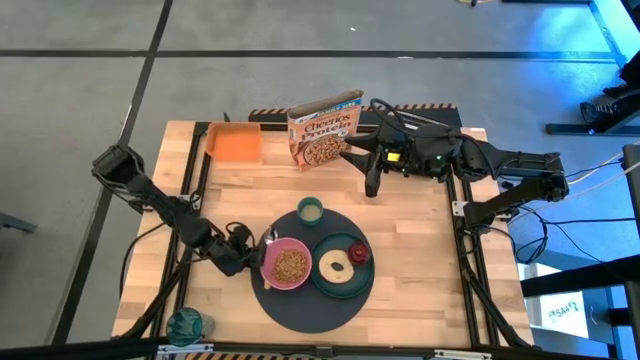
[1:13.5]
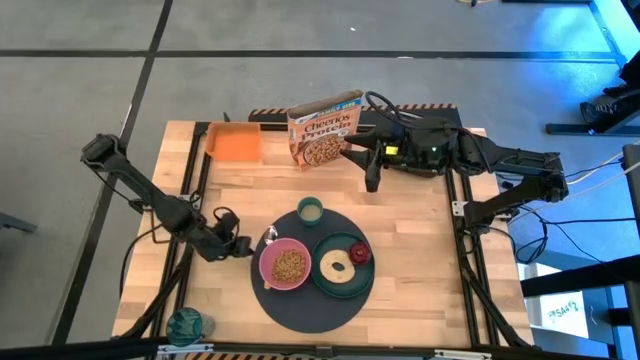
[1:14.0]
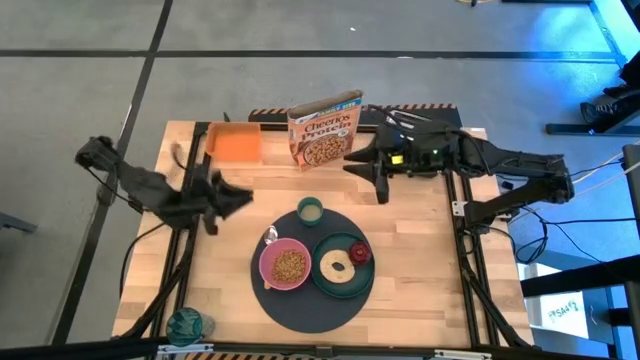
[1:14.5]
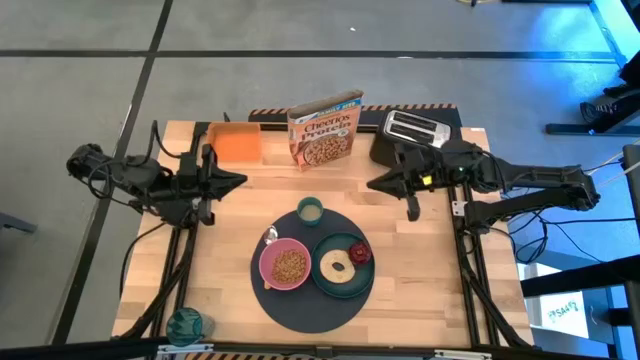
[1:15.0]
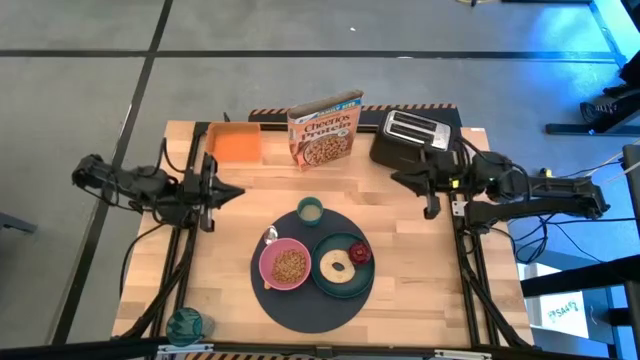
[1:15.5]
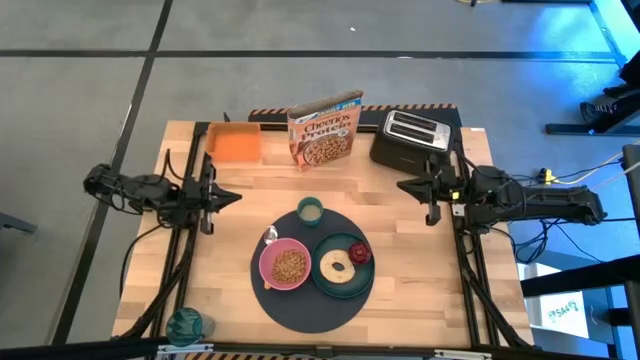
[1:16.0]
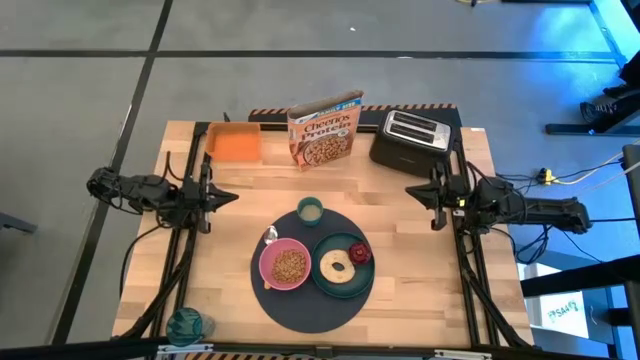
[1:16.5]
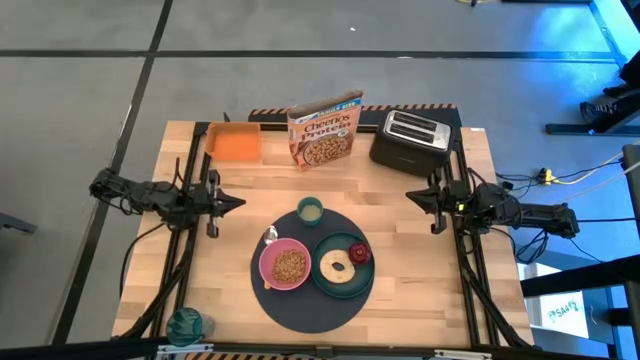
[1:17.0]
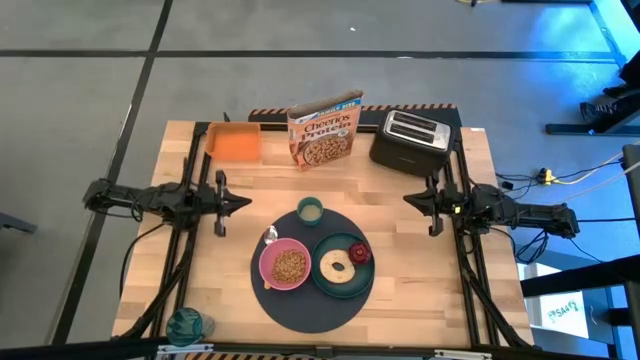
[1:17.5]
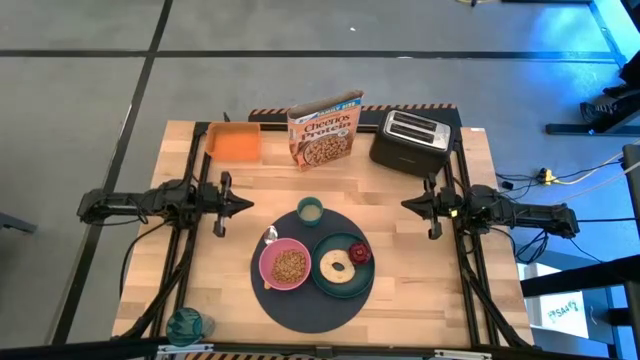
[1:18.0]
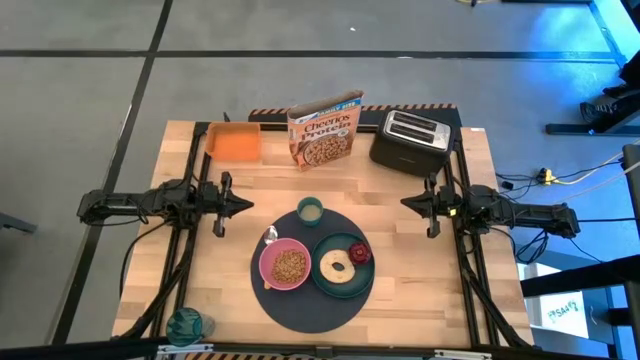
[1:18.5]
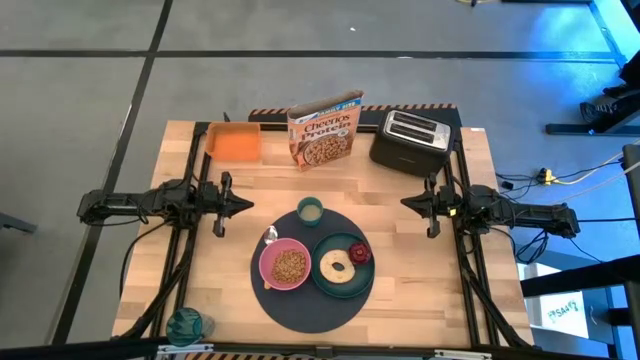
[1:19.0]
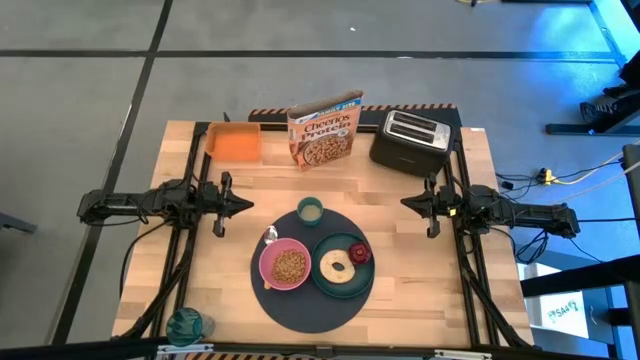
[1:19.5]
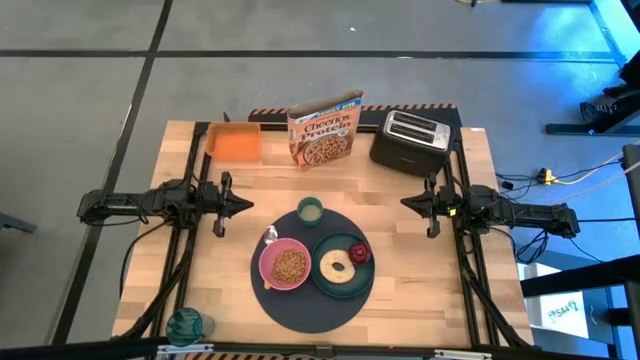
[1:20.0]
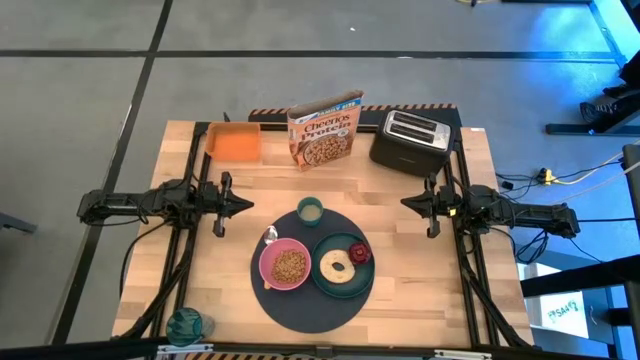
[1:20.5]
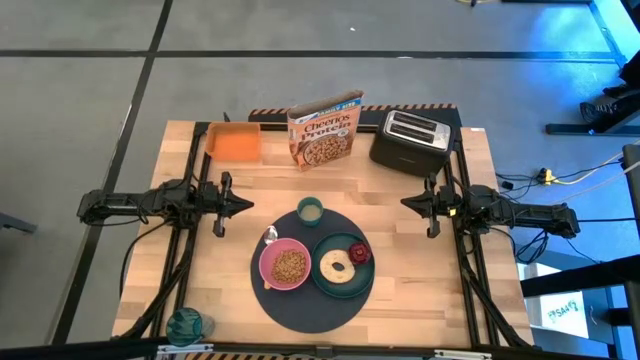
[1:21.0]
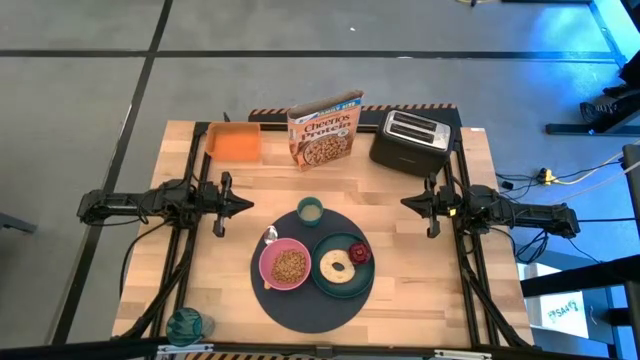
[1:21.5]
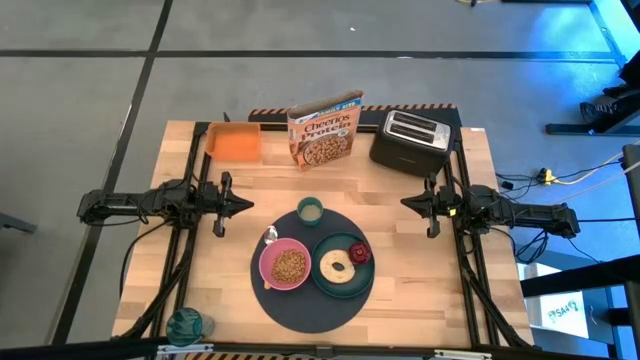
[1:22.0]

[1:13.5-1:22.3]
Task: Arrange a breakfast setting
Return to Home Position

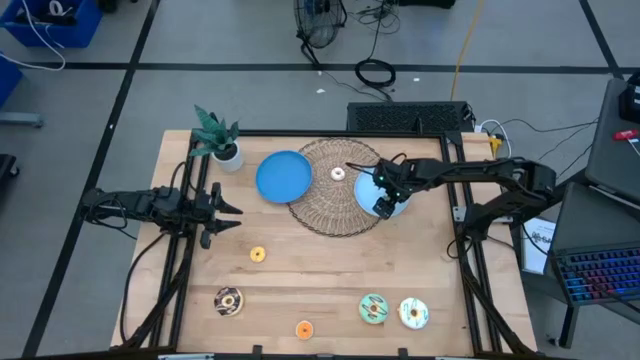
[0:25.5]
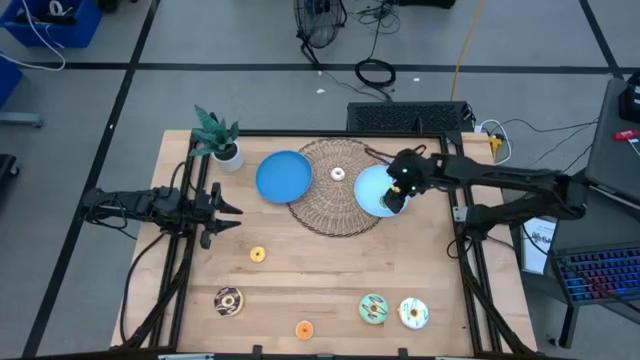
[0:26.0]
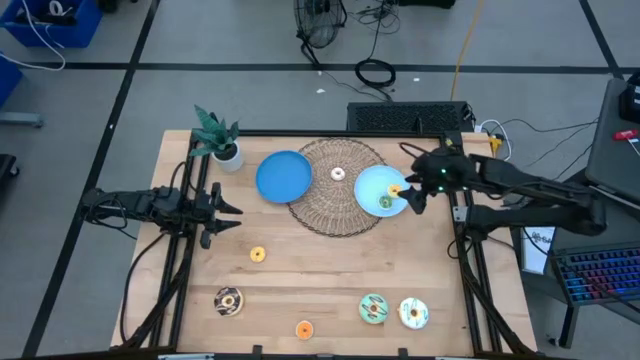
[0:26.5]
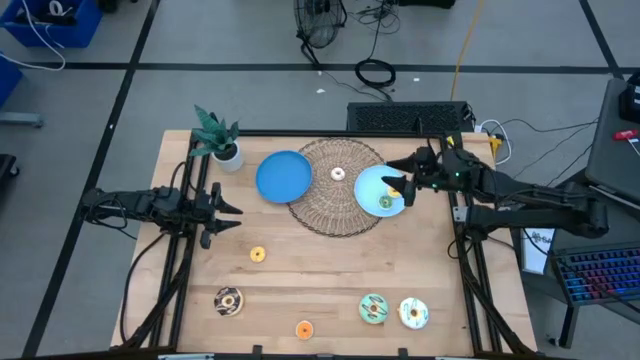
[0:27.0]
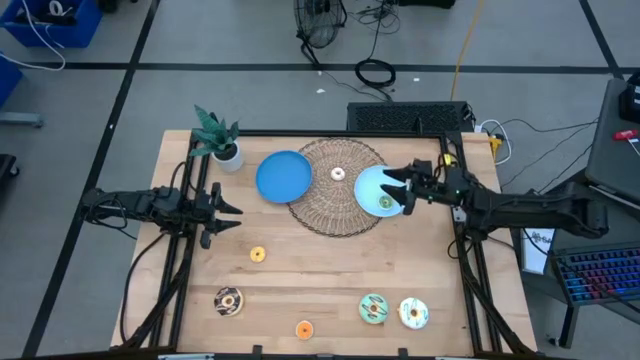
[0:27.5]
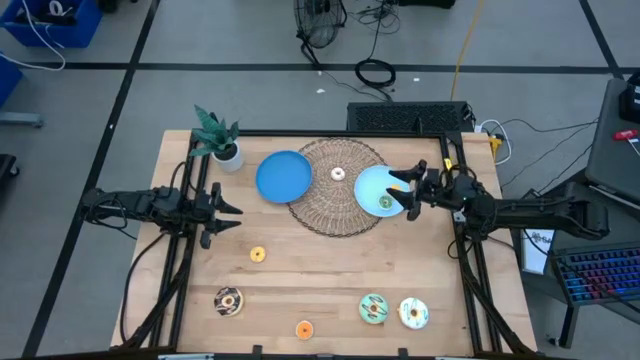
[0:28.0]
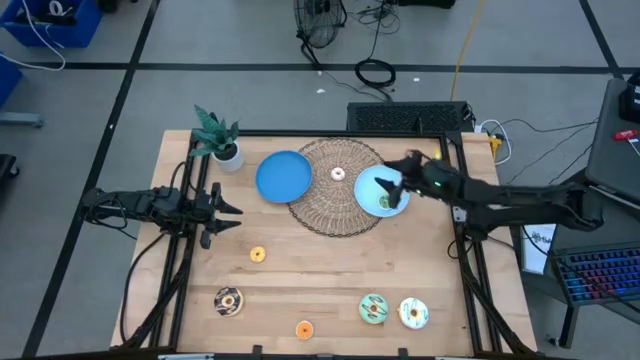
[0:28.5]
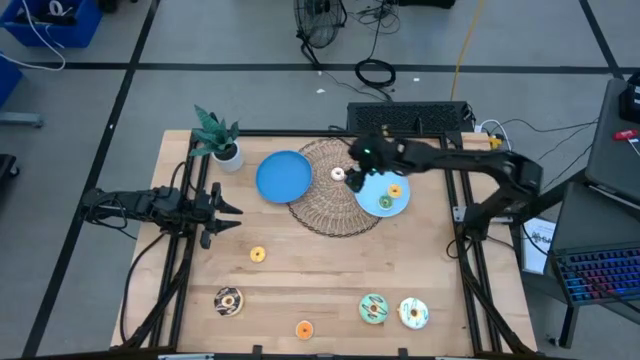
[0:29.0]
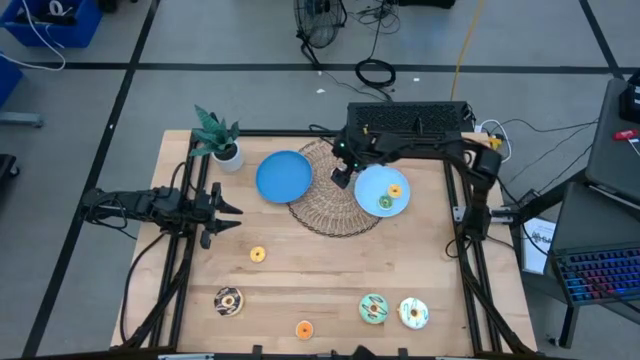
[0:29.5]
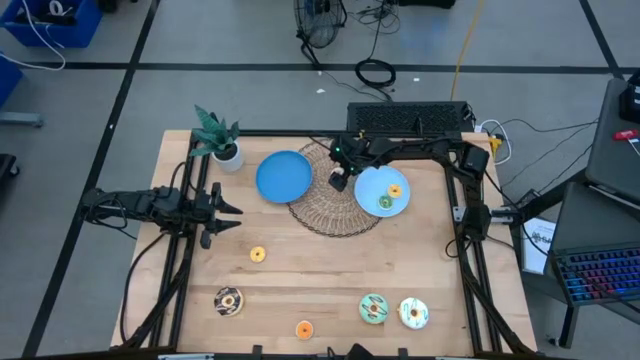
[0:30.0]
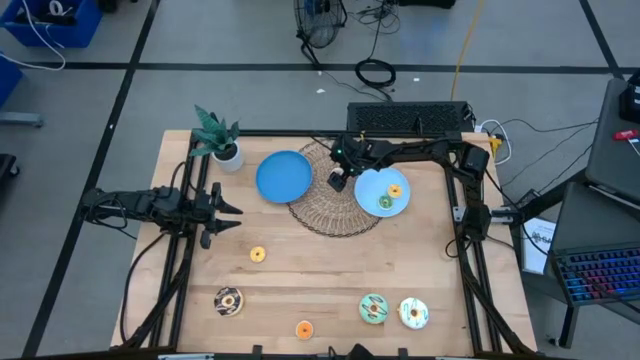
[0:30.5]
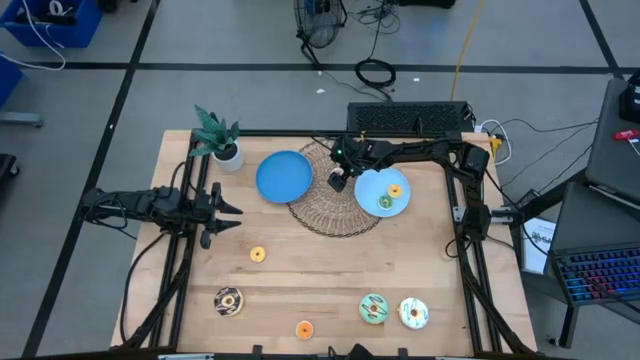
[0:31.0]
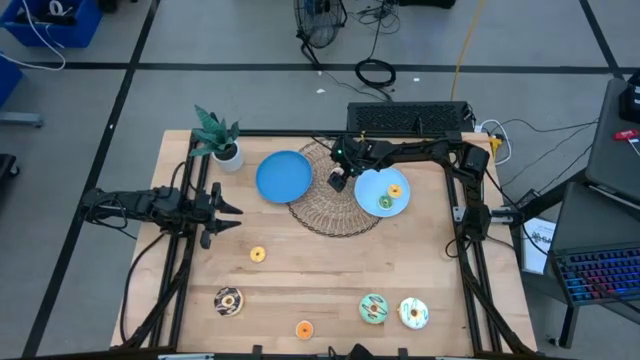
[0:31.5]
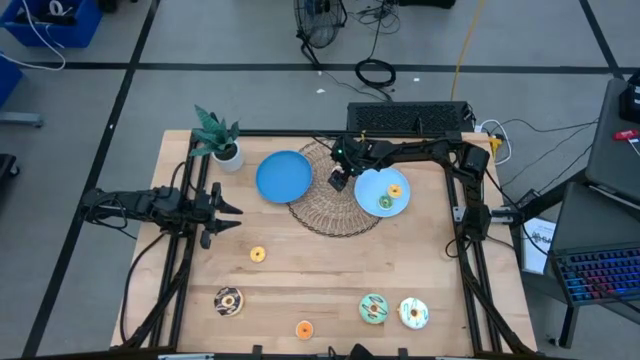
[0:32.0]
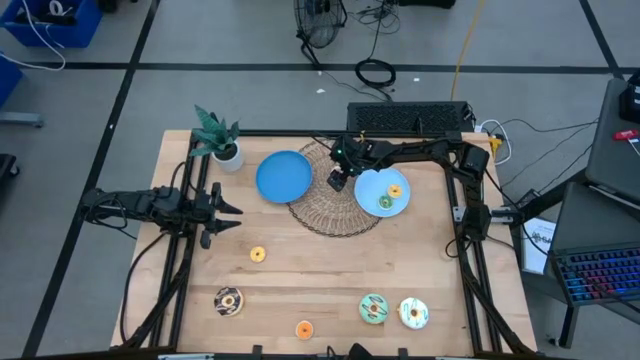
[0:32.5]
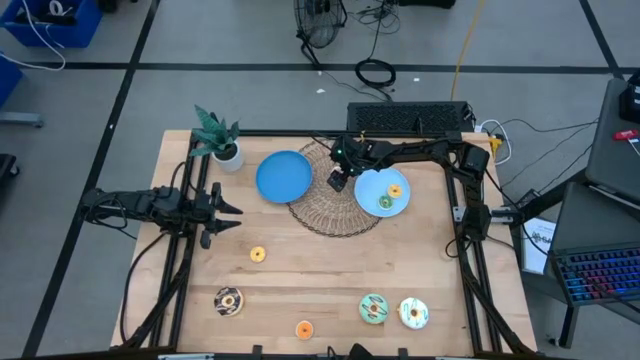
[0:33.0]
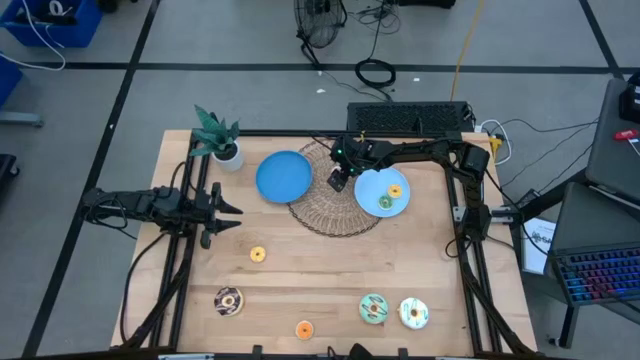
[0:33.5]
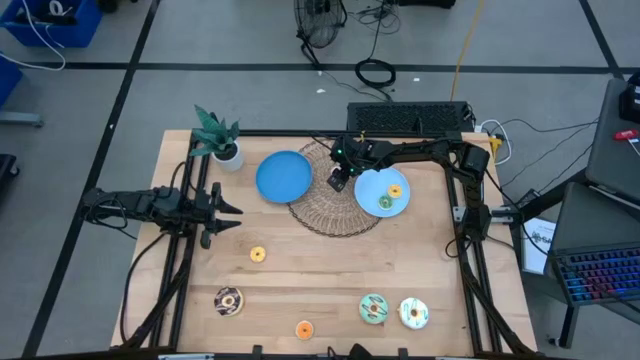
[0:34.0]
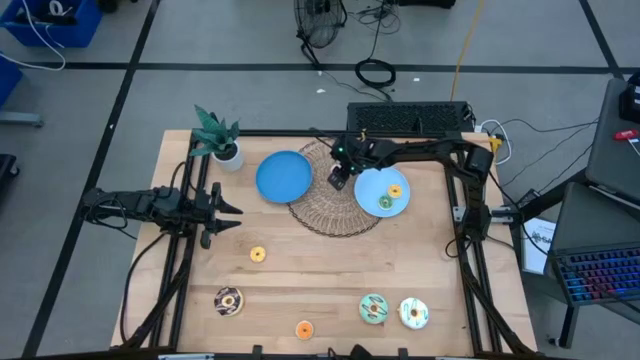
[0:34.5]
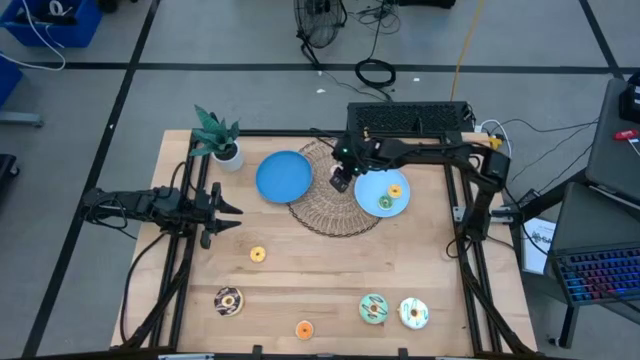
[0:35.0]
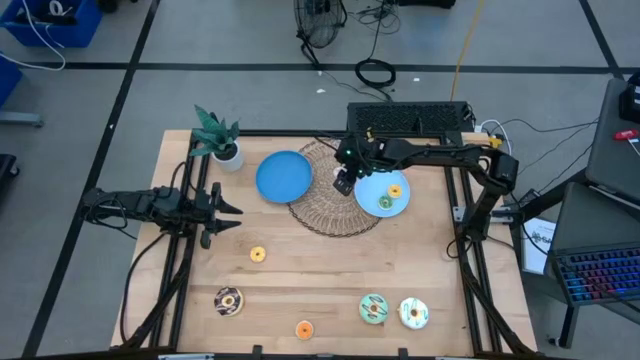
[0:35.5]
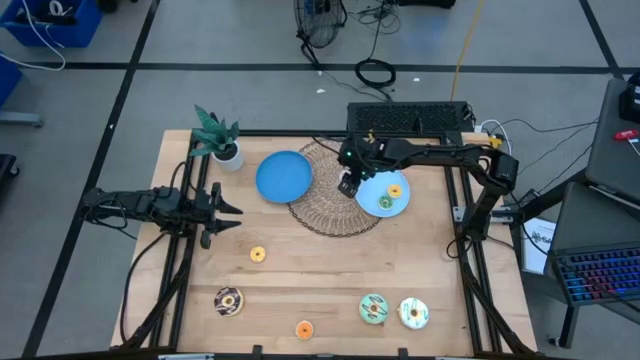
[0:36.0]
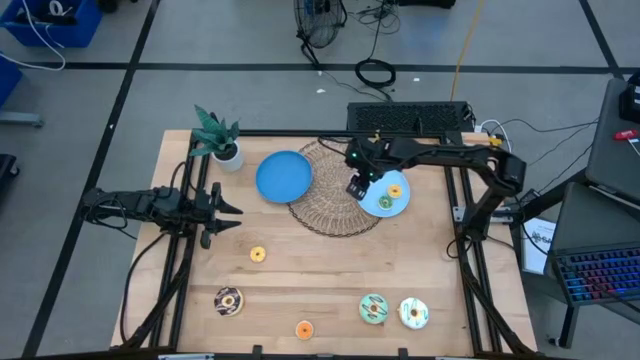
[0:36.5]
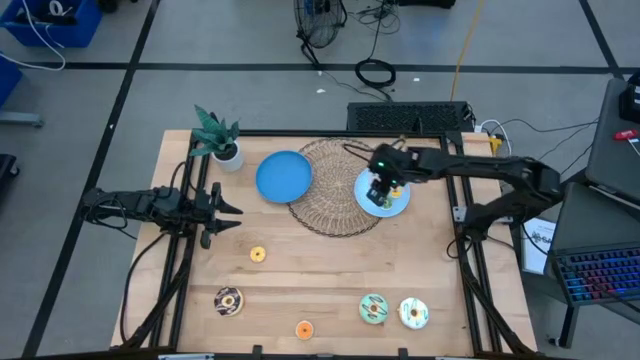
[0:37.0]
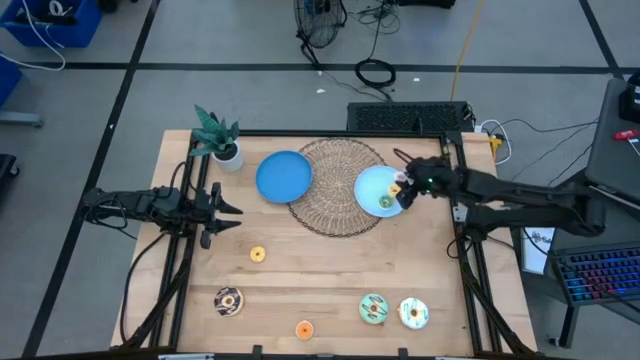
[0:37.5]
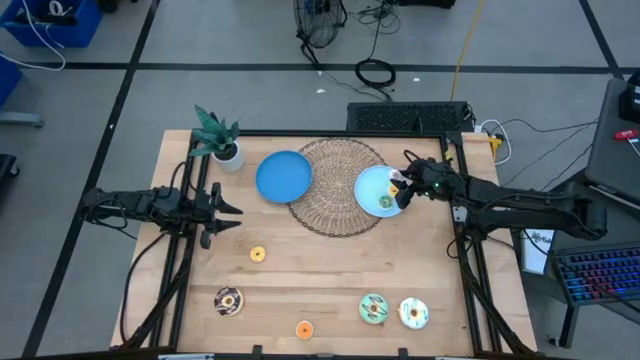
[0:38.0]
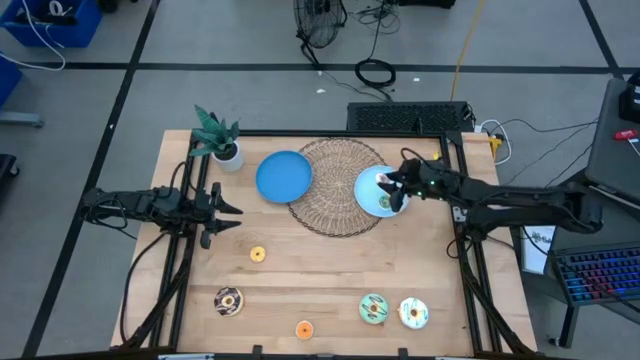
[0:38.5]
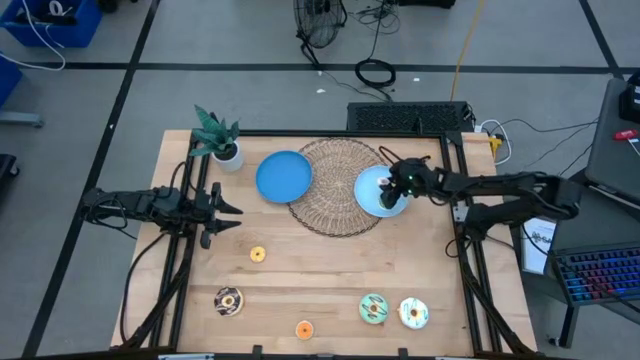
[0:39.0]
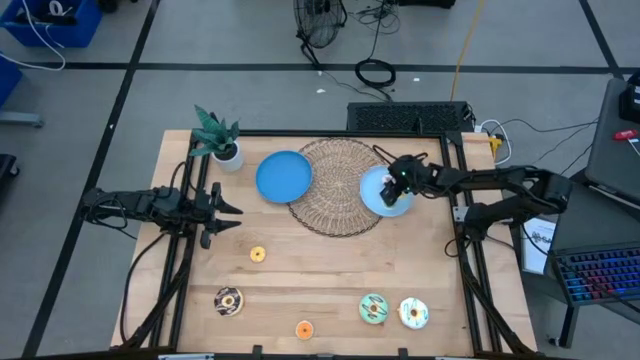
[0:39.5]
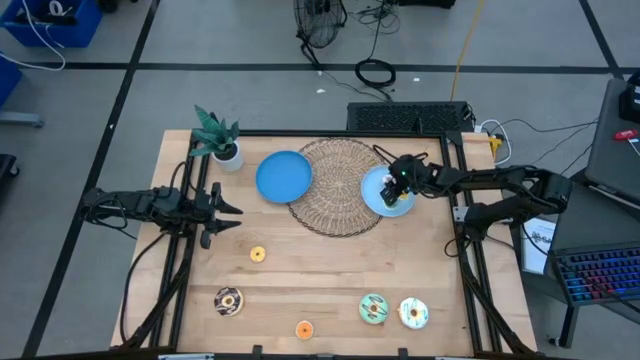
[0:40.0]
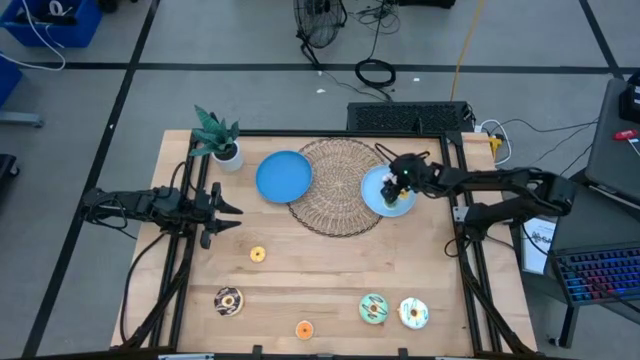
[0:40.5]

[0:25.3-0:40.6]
Task: Pick & Place donuts
Put the small white donut on the light blue plate
